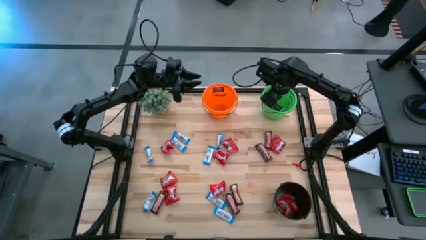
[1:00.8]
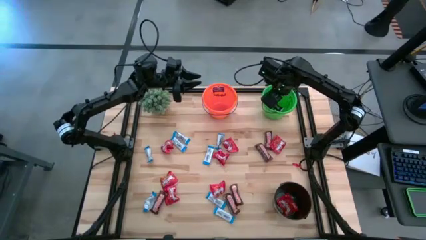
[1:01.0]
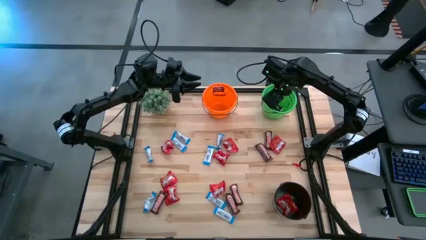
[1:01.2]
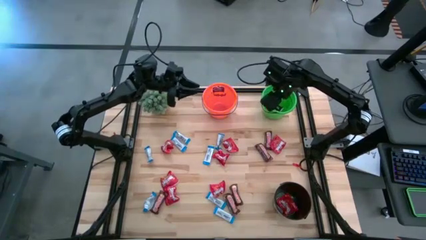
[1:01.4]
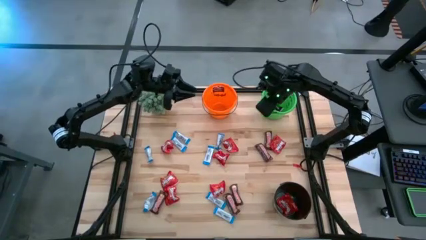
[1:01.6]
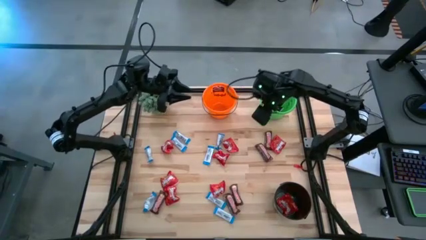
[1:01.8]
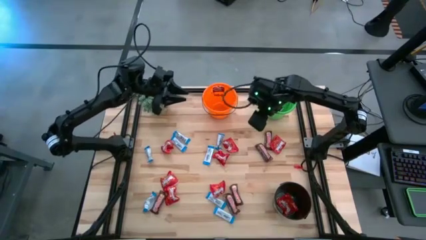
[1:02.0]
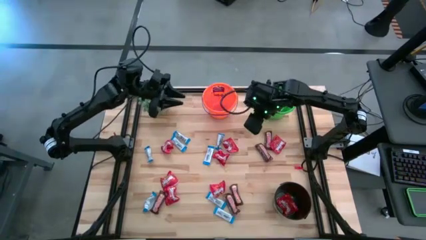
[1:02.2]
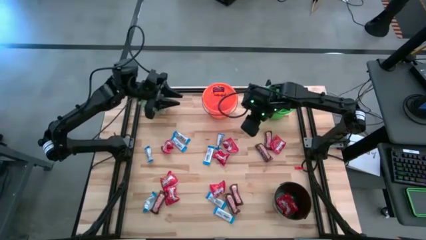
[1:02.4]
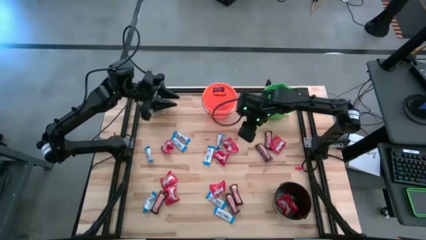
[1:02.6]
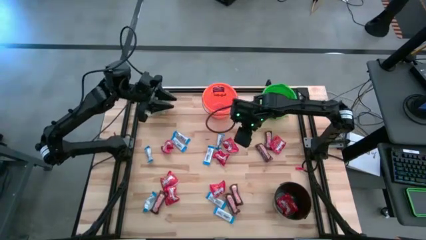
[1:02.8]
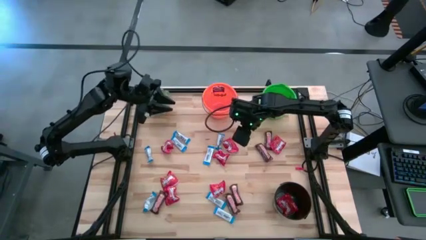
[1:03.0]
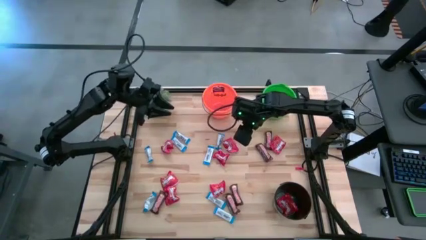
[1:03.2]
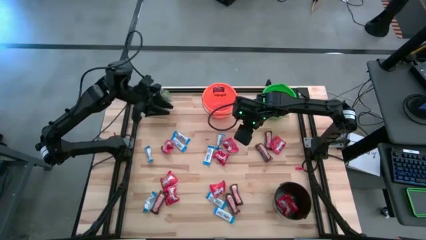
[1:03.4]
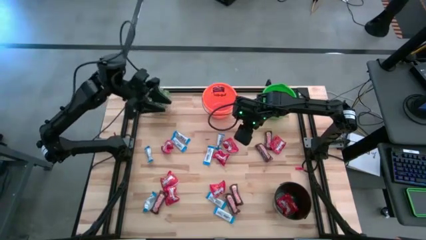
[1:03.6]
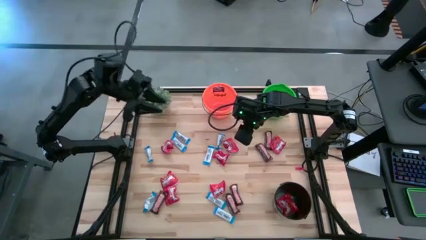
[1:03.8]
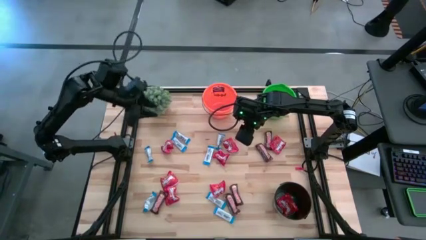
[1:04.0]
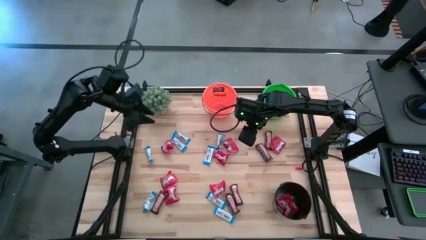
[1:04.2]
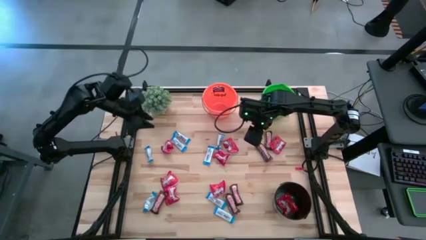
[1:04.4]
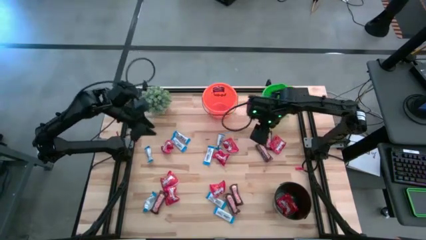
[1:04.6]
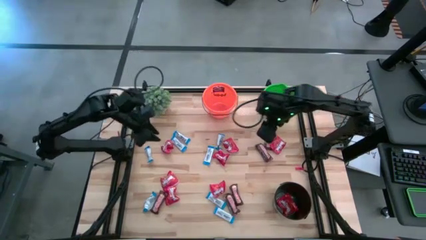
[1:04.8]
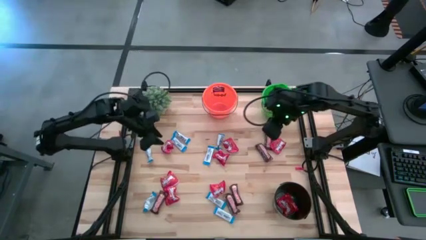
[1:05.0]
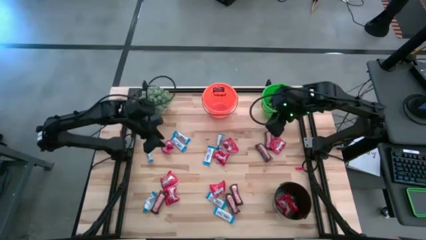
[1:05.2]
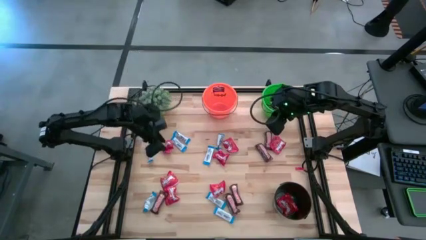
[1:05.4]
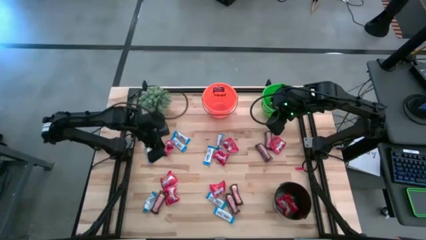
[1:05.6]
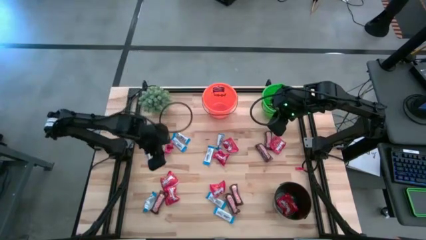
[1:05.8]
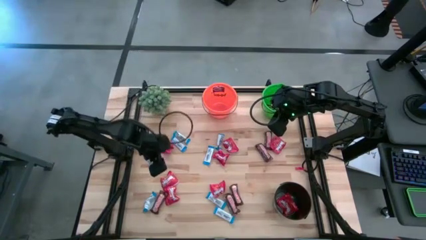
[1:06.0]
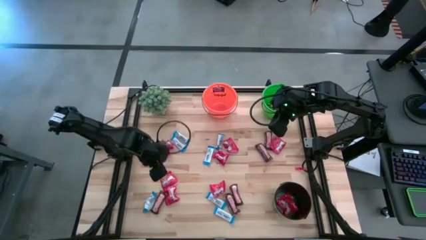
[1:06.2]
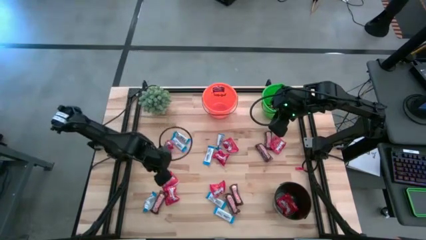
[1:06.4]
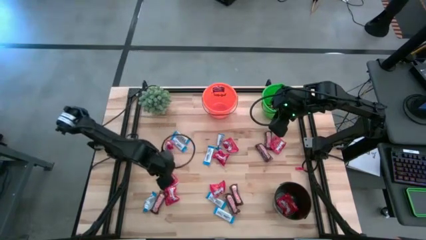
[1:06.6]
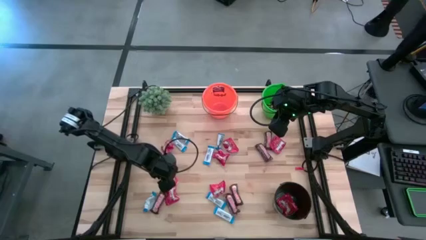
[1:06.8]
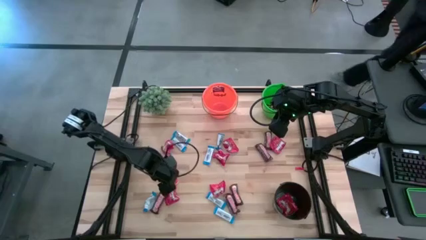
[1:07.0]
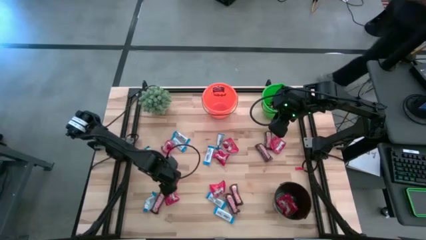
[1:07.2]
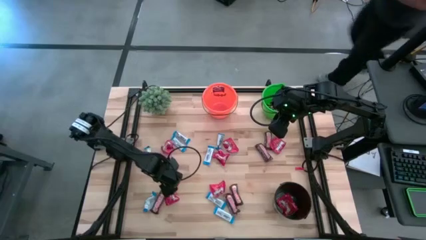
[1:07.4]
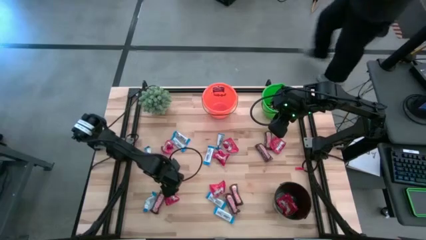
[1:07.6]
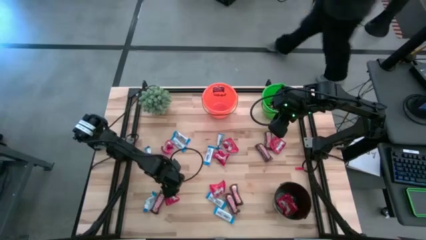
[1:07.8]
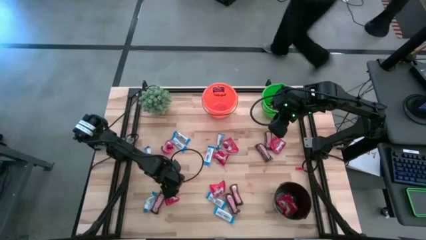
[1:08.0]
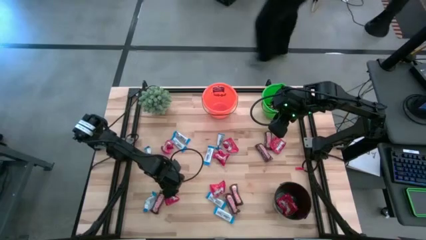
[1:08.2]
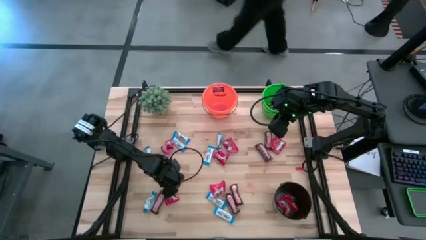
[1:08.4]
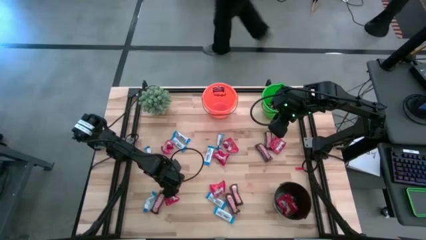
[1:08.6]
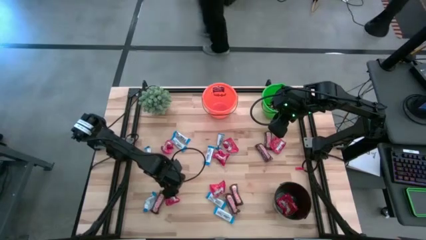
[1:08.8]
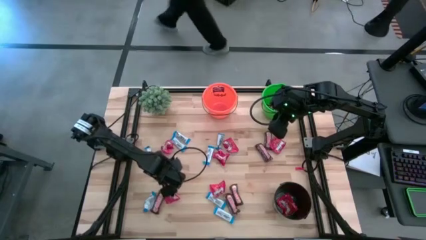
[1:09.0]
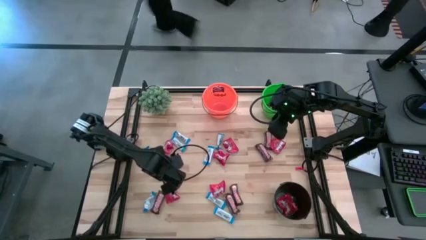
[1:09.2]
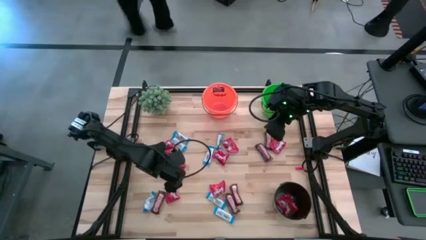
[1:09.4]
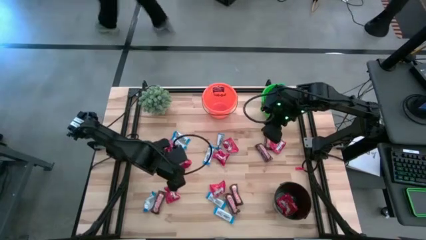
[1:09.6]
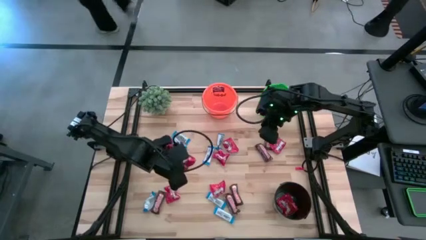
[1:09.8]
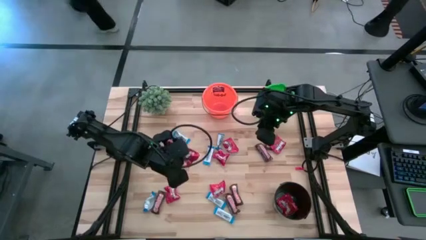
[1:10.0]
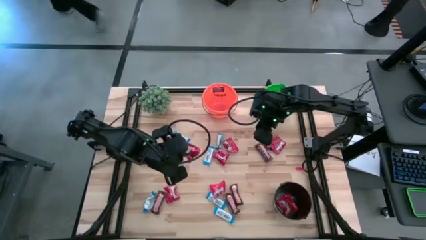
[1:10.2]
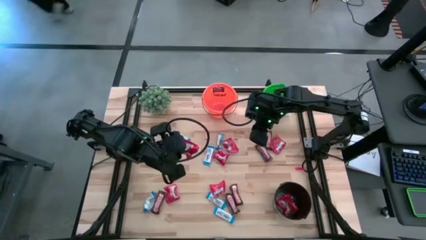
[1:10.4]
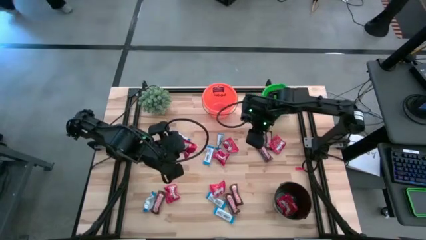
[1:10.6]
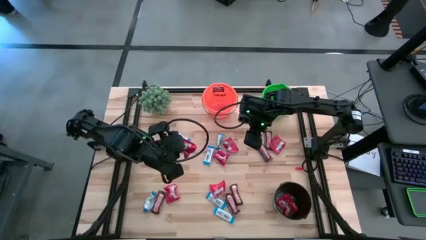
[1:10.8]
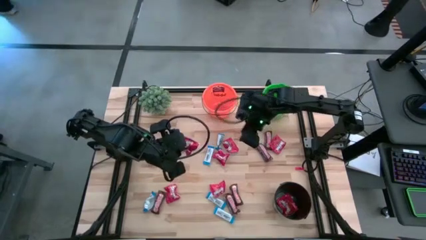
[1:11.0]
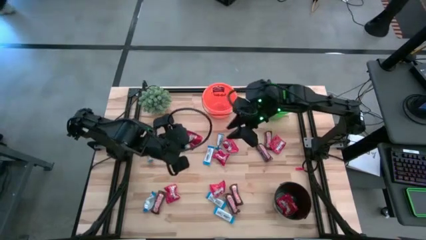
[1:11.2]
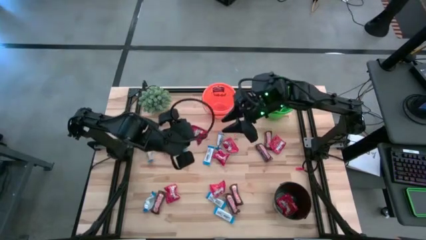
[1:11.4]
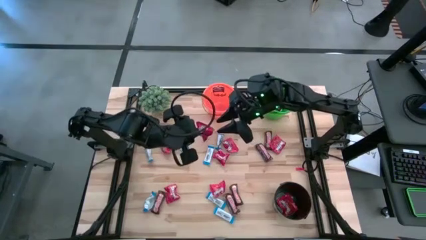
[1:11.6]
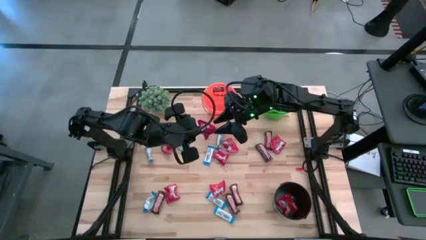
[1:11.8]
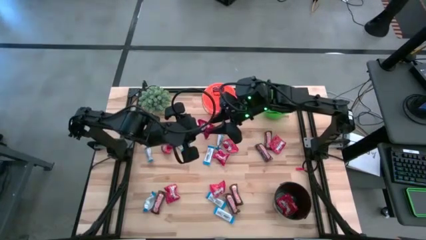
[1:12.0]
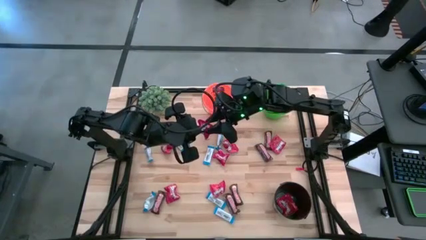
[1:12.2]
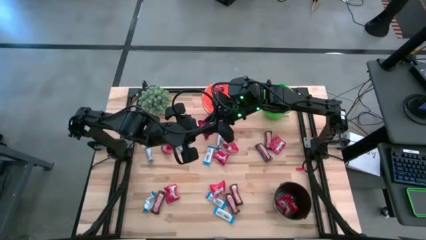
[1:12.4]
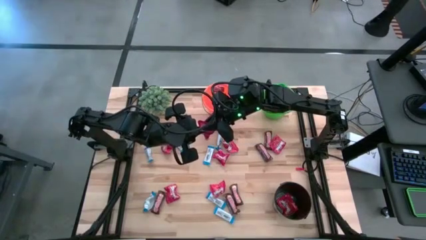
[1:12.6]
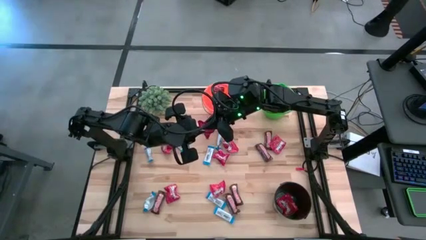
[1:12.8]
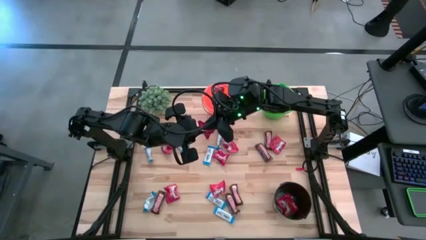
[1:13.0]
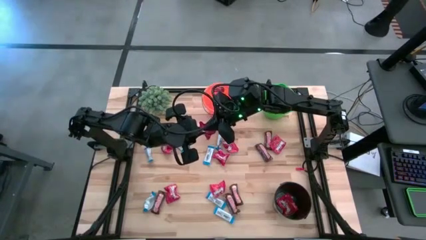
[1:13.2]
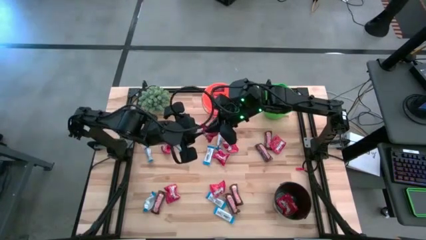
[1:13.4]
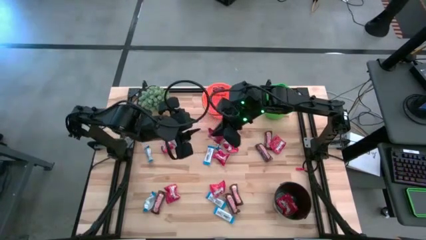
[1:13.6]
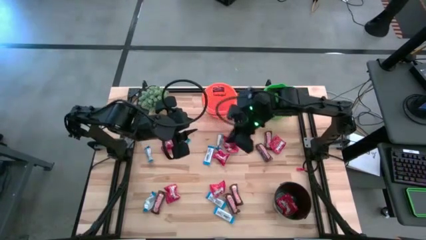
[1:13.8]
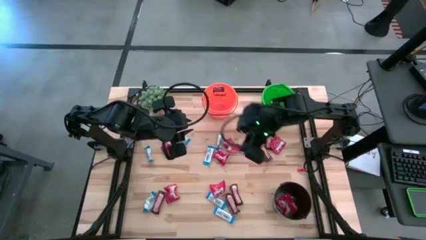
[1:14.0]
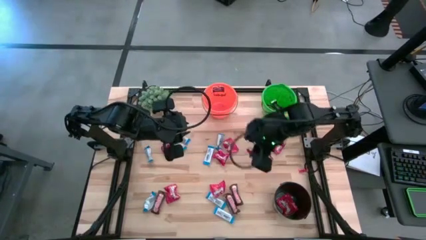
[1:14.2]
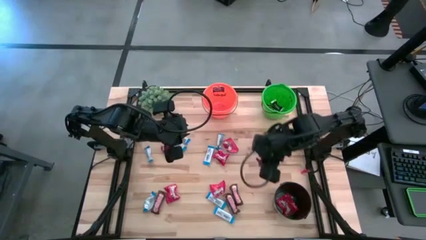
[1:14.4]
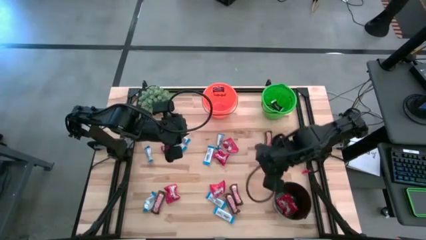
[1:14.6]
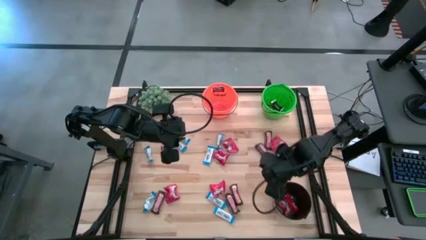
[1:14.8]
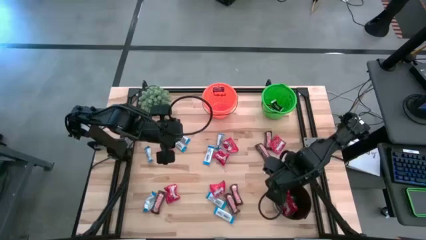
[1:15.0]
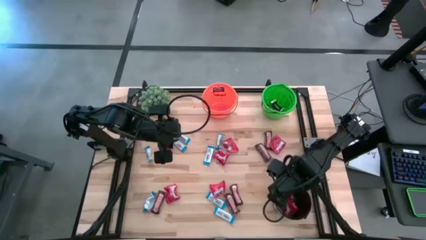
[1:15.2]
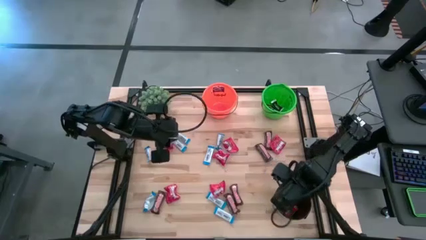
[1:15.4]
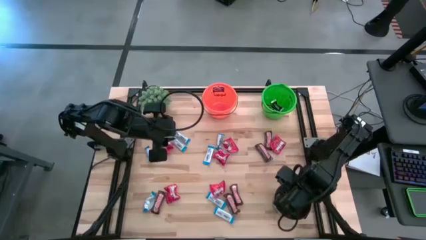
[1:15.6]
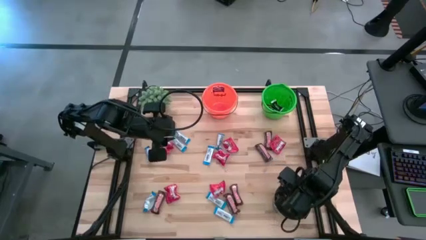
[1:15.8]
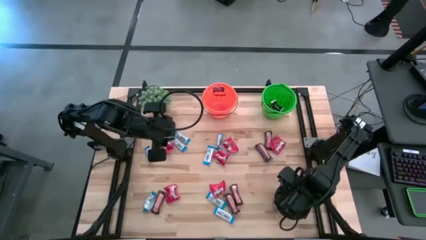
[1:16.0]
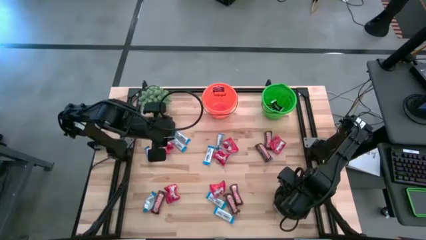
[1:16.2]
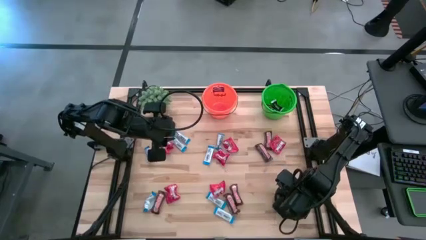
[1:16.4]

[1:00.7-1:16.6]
Task: Organize candy in baskets
Put the red chocolate into the black bucket
